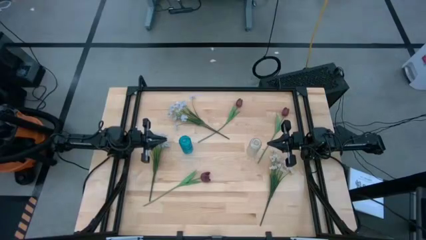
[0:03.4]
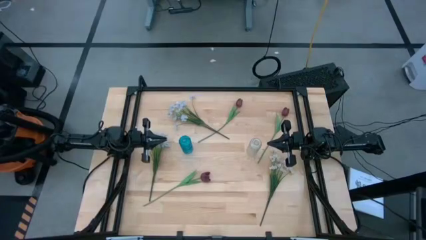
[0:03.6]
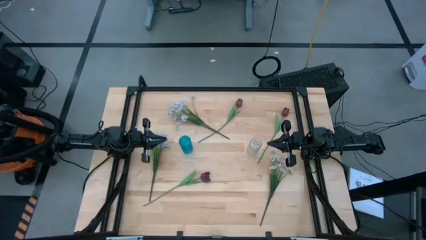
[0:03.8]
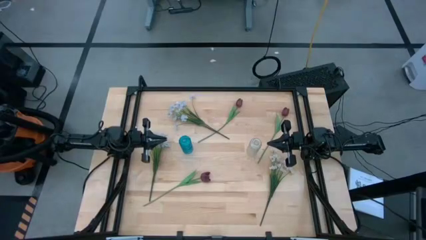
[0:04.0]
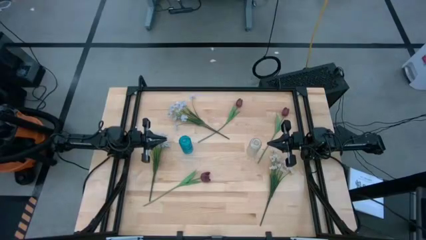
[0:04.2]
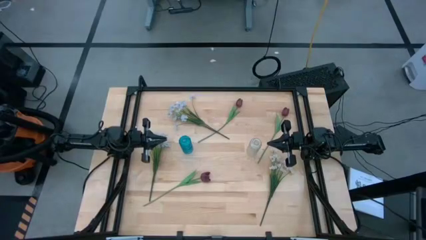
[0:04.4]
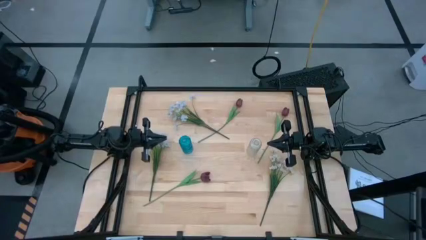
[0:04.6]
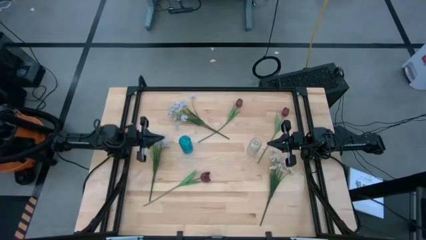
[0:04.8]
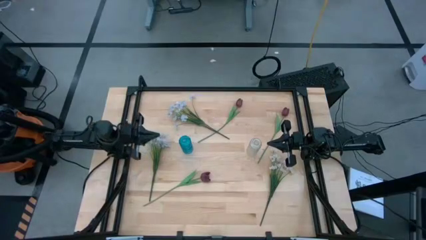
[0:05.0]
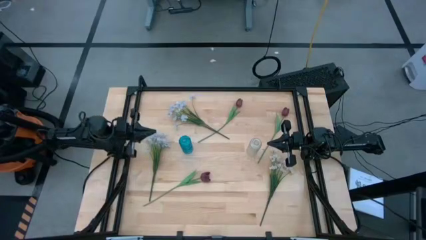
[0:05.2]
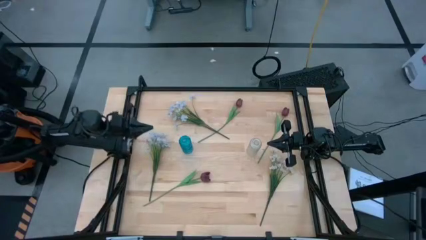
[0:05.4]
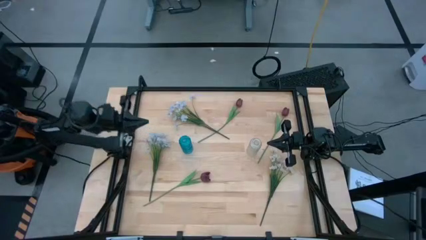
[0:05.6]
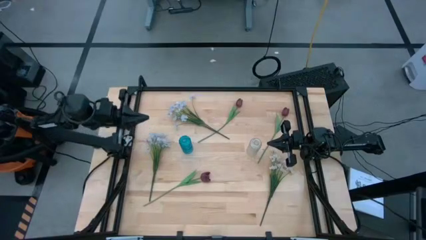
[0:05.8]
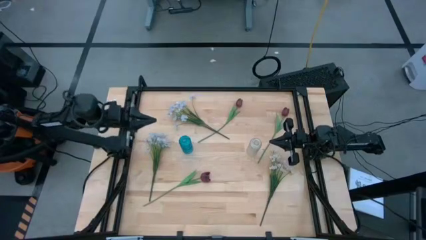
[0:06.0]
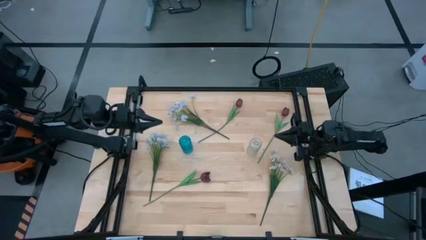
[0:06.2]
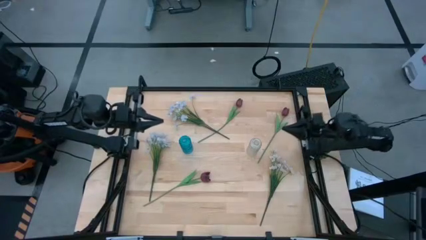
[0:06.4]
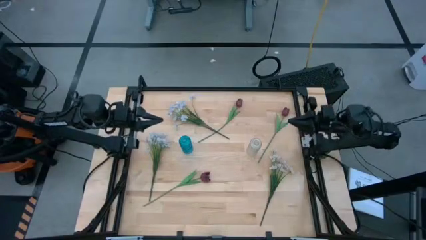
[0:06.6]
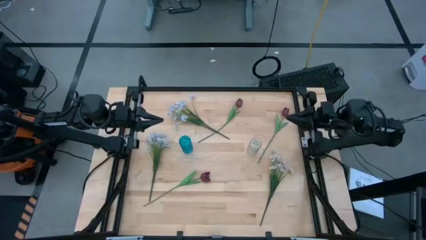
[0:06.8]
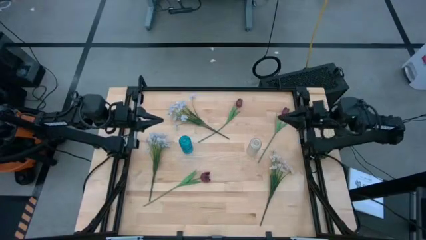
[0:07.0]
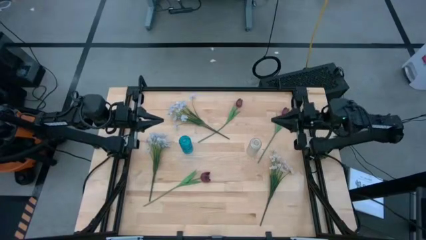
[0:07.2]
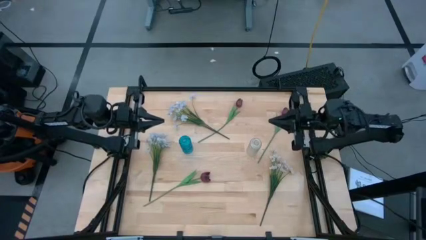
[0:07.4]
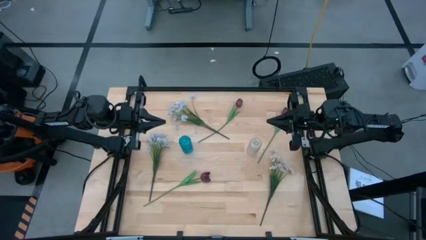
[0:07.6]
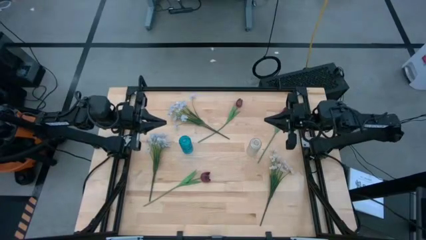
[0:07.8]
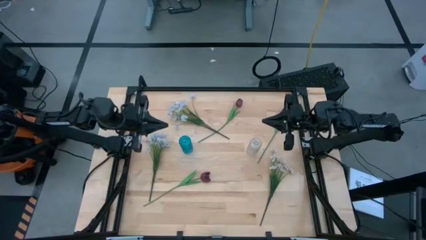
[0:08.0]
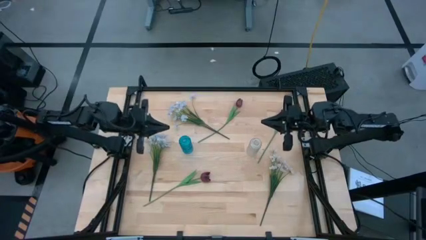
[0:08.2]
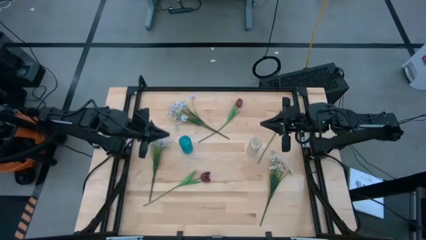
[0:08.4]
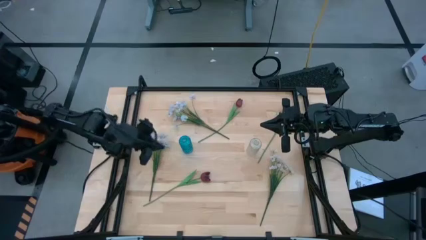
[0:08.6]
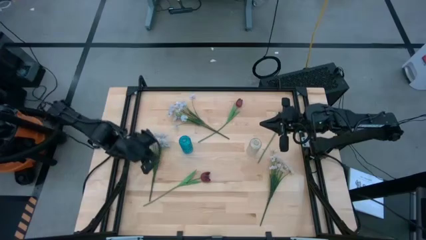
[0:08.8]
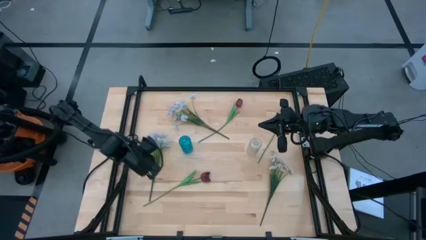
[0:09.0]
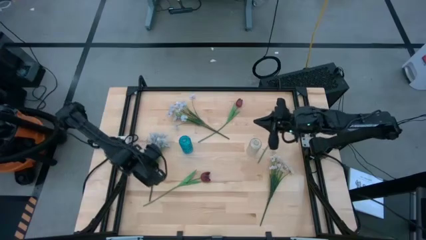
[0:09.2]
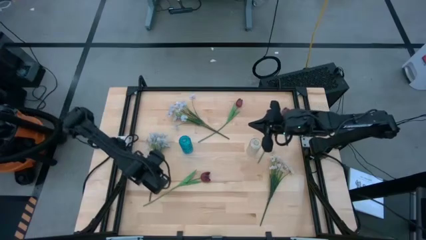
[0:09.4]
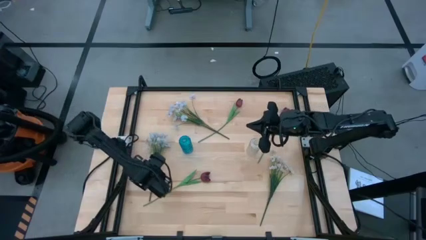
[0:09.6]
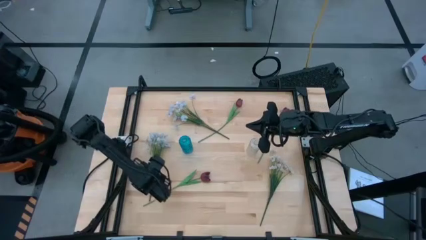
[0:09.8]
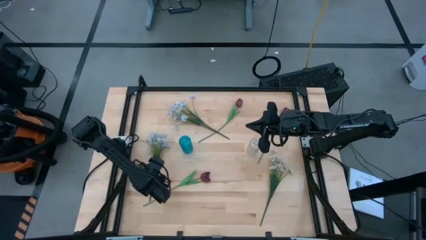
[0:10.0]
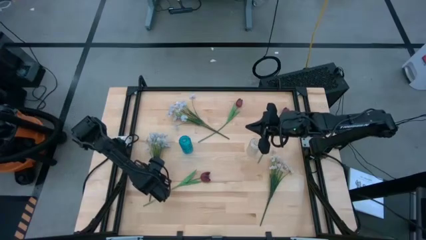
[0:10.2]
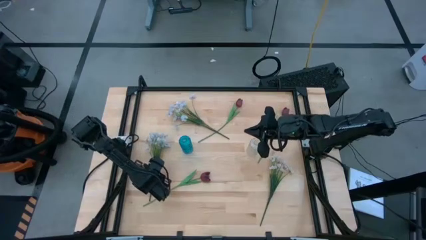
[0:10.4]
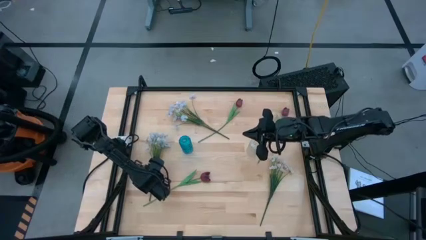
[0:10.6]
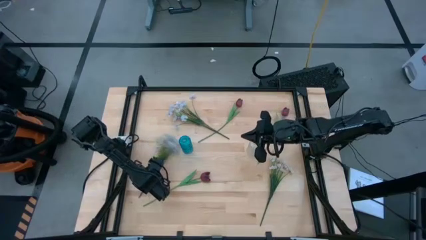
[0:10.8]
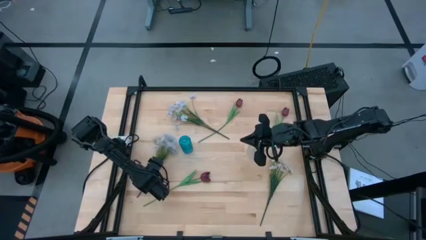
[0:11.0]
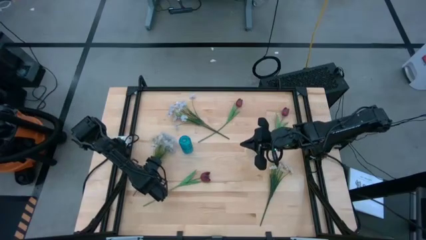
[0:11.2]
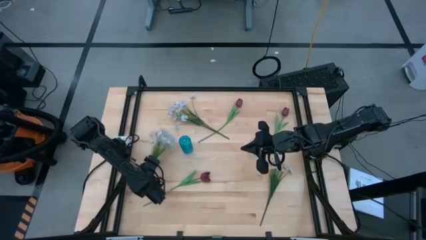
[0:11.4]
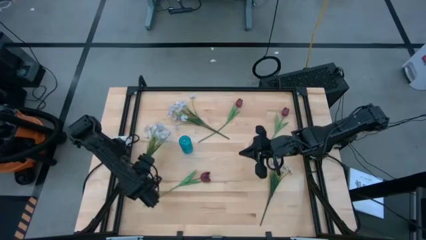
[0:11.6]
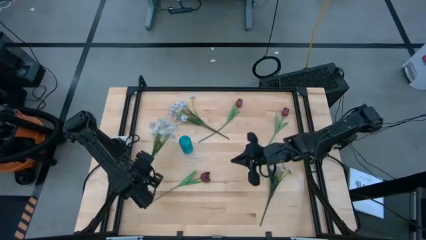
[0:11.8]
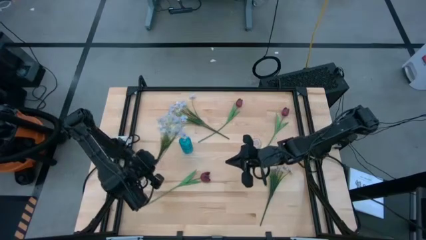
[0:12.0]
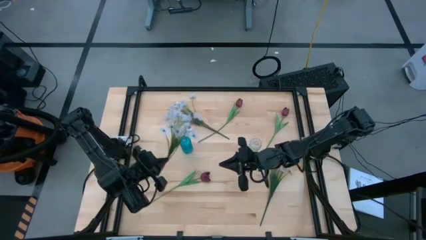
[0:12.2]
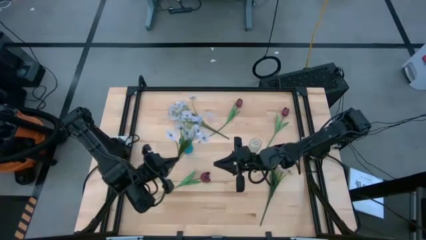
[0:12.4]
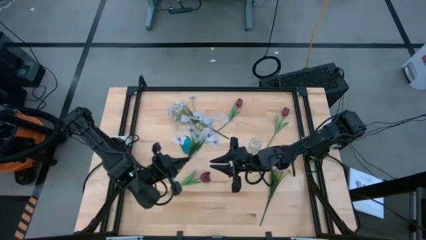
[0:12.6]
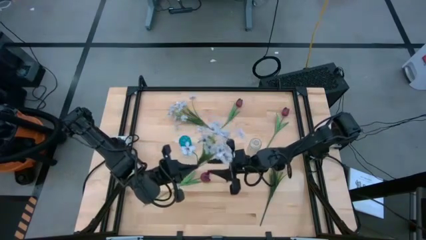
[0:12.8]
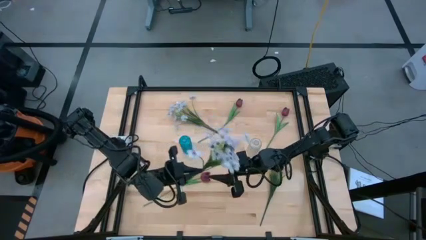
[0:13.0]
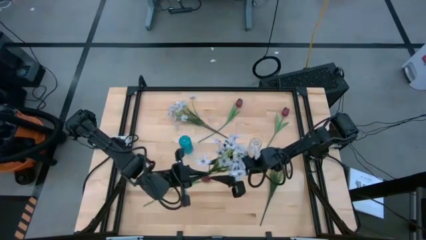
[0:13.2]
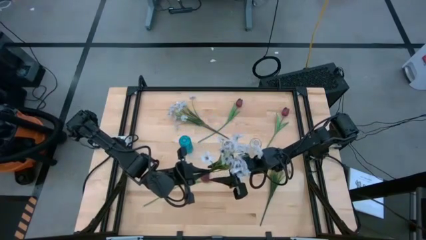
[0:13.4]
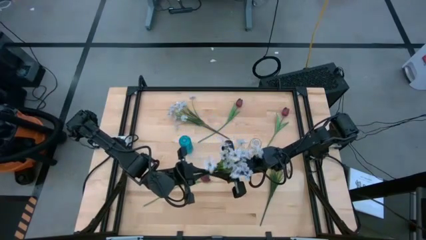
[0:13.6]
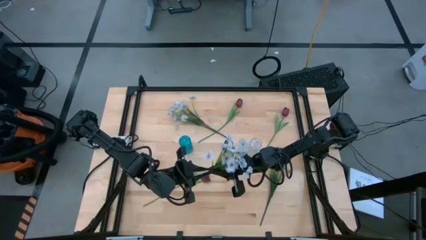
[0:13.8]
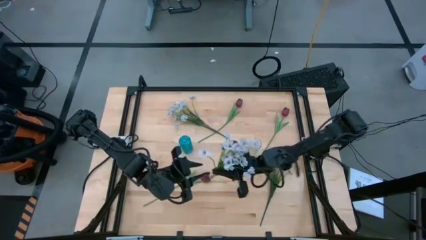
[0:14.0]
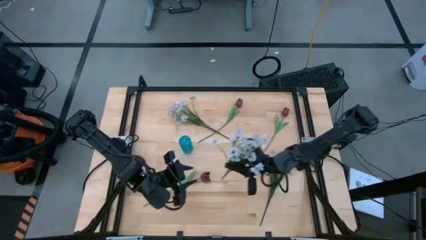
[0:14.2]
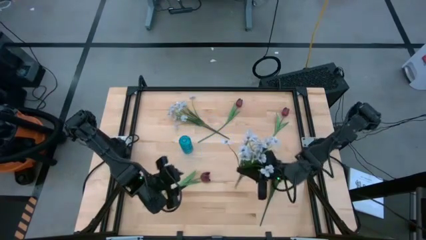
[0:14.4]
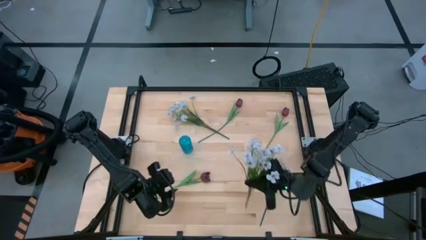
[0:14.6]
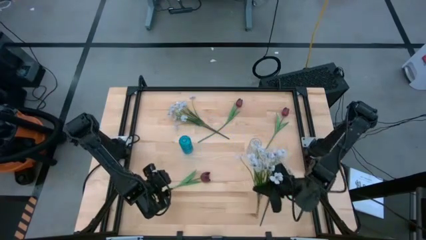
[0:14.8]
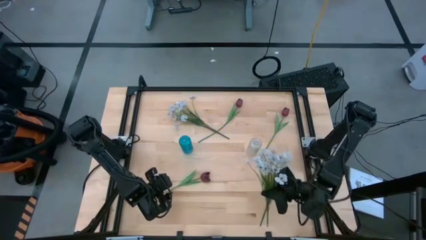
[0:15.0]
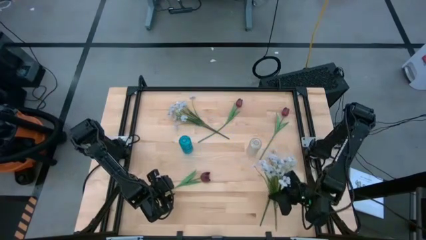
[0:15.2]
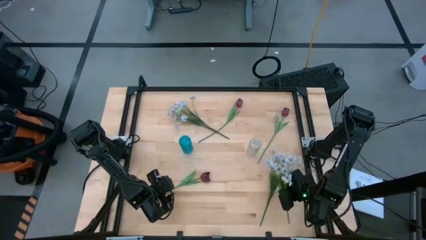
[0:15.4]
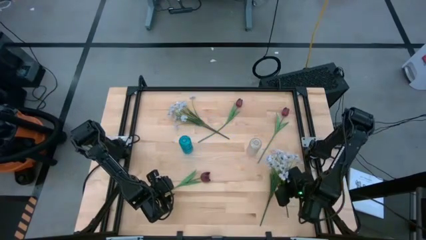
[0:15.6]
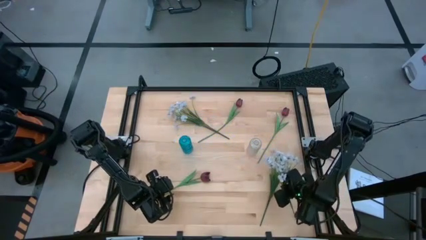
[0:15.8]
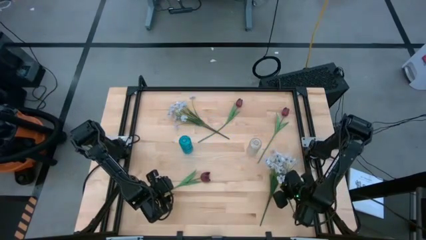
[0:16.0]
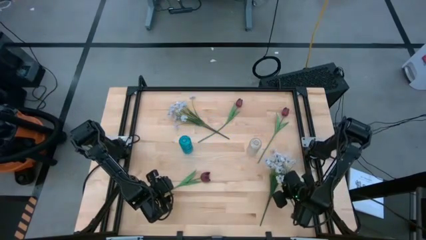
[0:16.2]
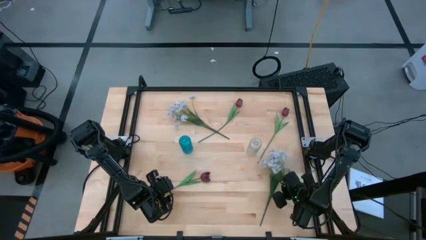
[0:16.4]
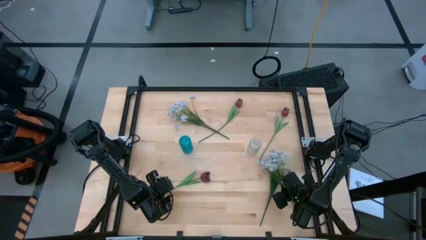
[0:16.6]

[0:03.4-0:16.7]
Task: Sort flowers into vase by color
Move the left white daisies to the bottom right of the table

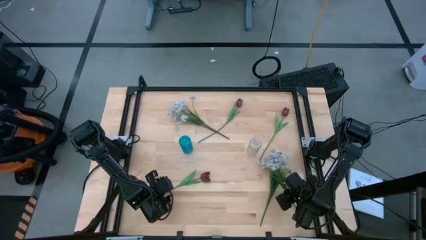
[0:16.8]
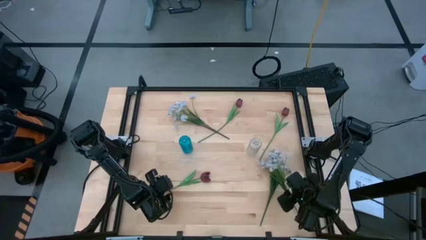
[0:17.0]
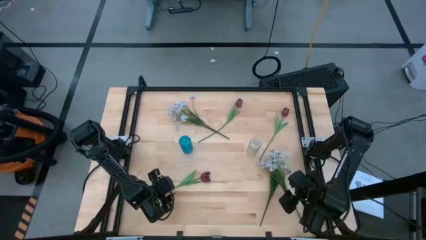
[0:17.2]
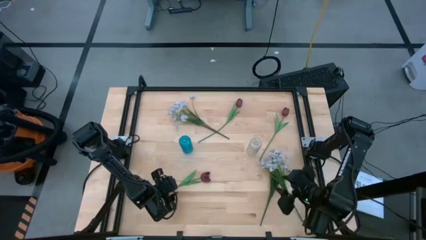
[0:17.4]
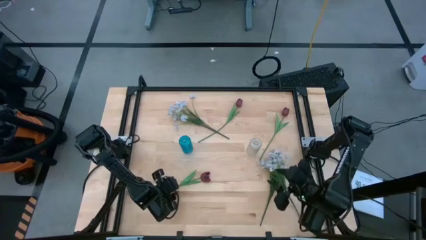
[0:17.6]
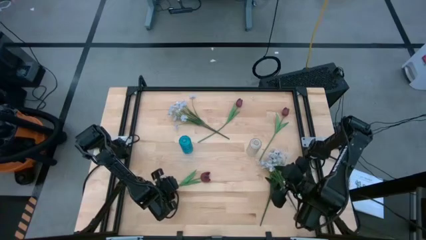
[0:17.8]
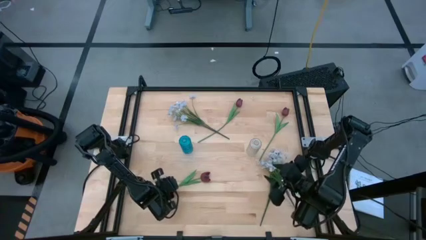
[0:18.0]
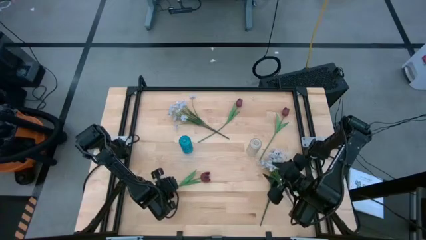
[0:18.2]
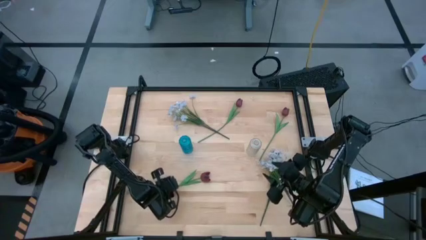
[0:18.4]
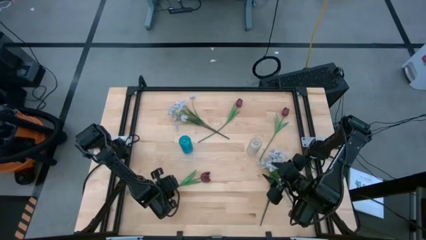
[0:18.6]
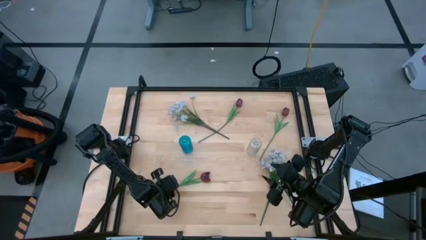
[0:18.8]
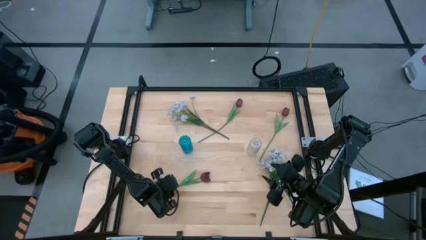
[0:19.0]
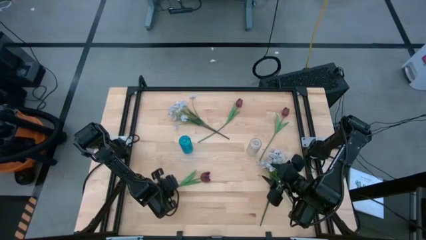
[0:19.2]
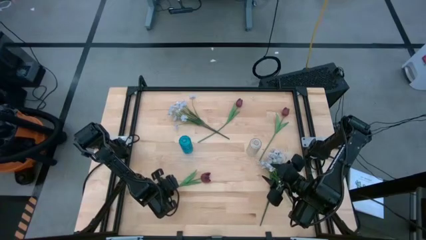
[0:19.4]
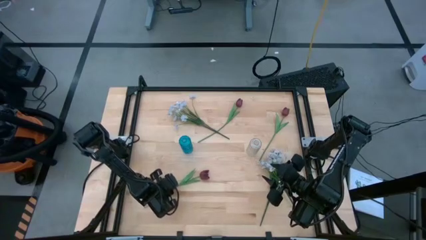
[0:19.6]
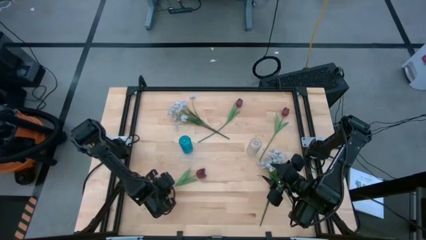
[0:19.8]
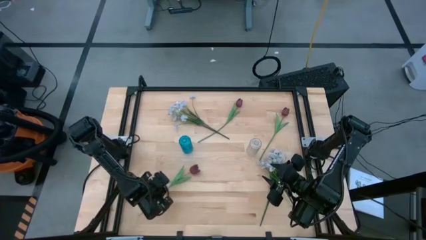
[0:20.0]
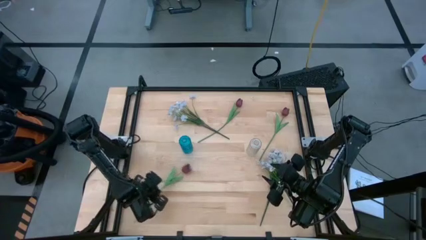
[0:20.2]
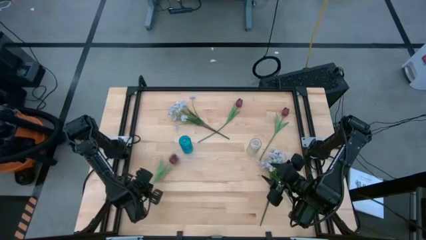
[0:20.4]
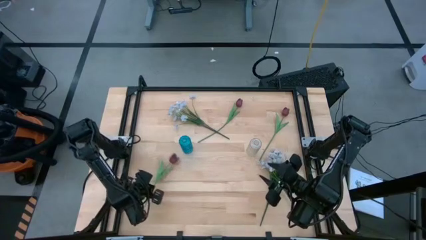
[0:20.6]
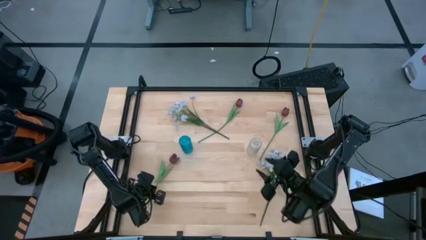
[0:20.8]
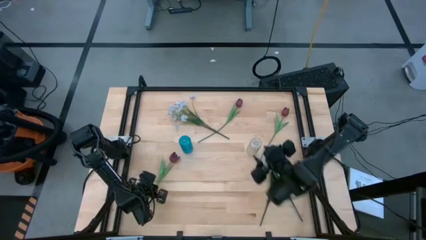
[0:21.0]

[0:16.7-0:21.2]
Adjust the bottom left red tulip
